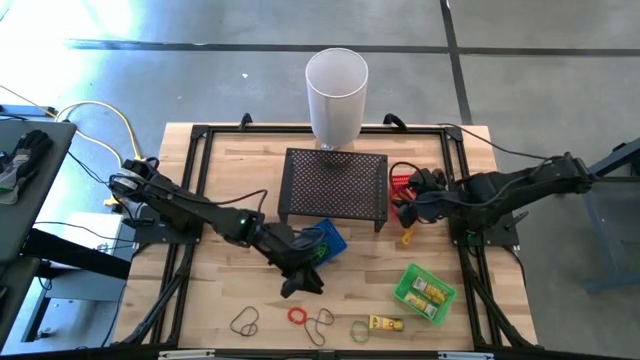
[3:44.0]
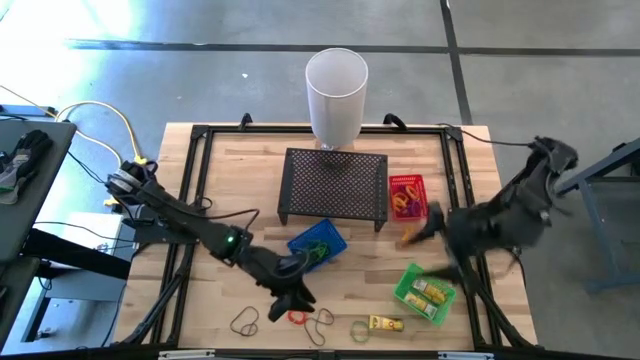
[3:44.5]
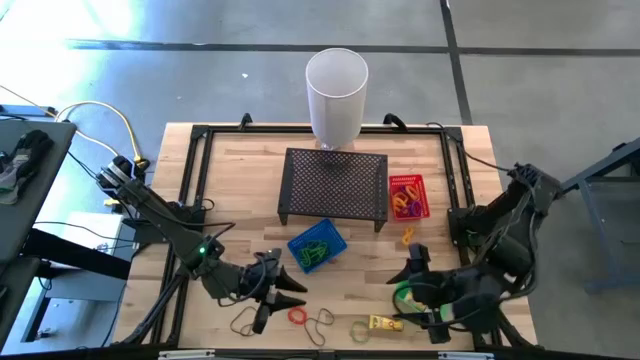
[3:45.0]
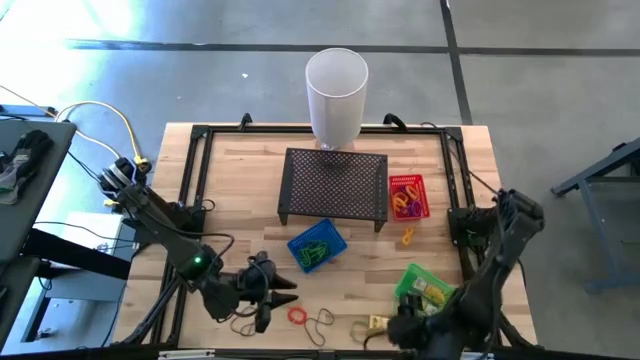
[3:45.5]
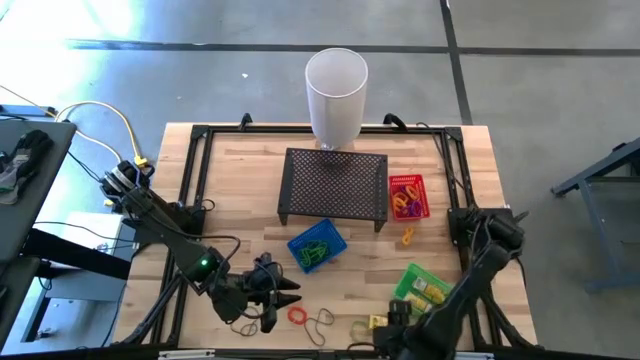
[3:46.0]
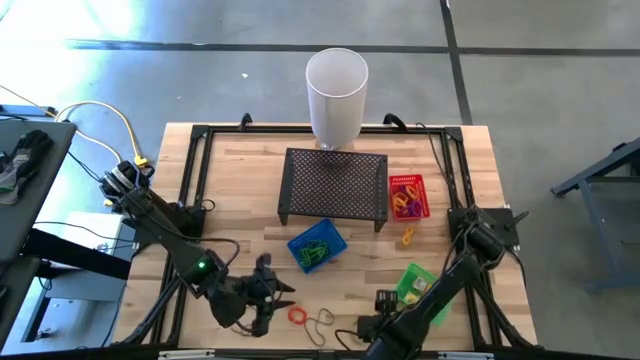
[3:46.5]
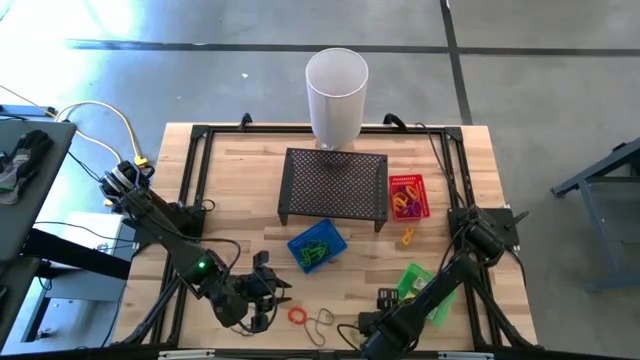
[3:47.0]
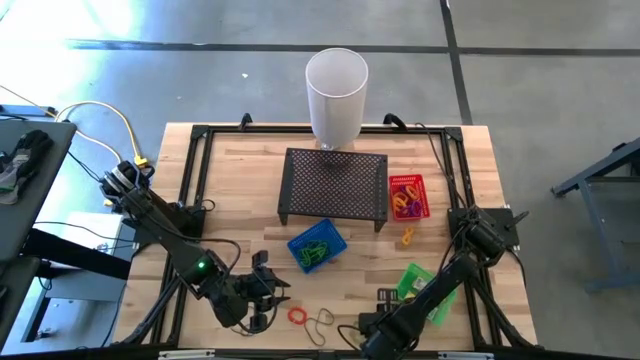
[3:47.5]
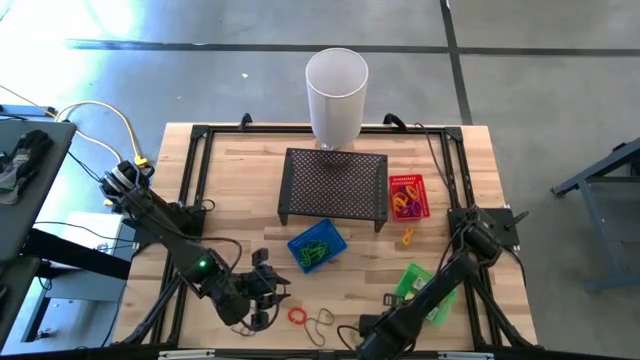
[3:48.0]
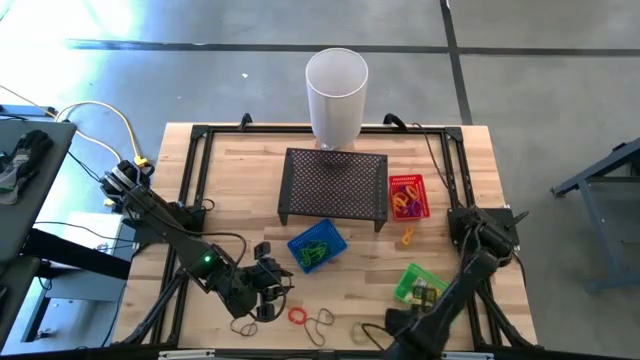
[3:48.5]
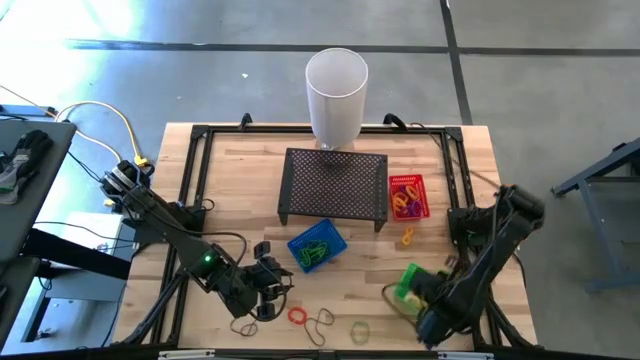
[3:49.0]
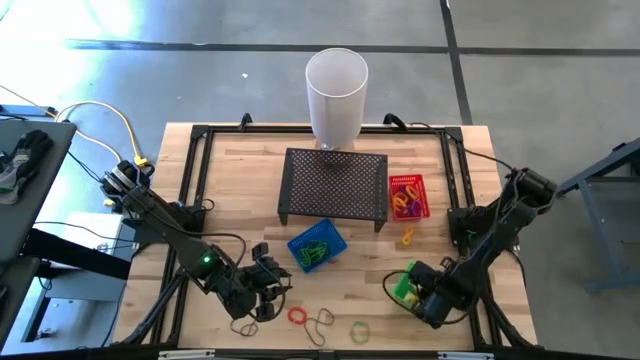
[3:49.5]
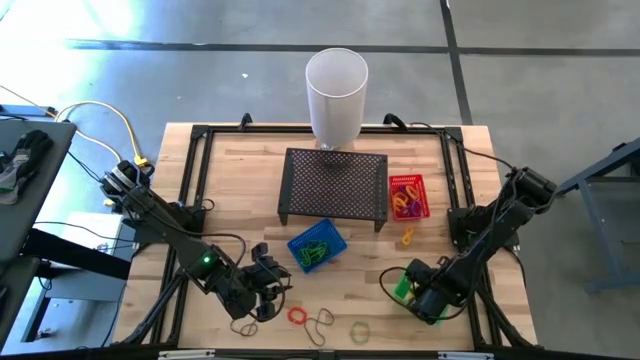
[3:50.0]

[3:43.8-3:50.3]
Task: Pick & Place Office Desk Supplies
Put the yellow crayon box into the green bin

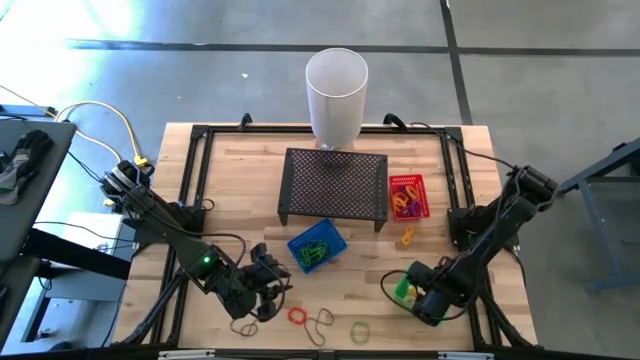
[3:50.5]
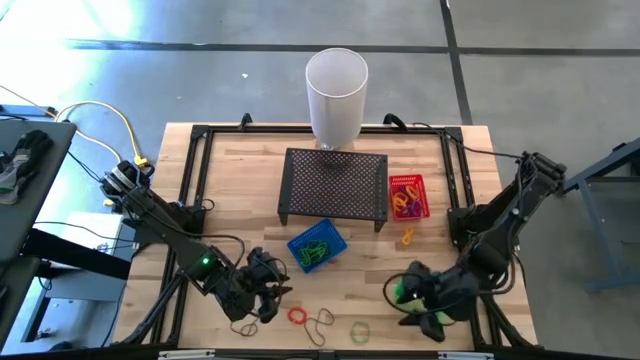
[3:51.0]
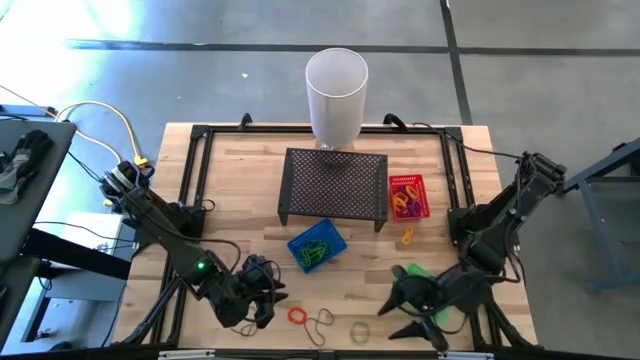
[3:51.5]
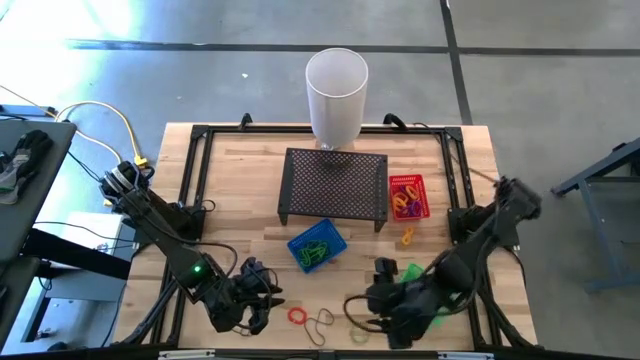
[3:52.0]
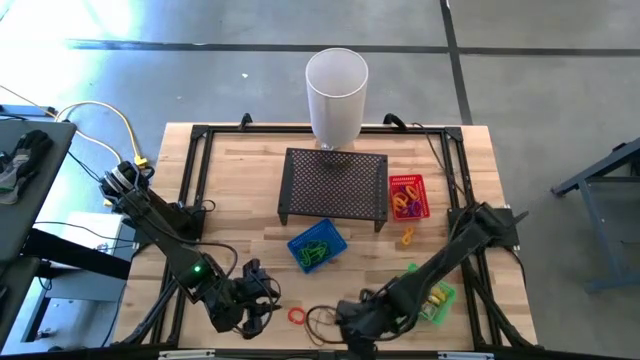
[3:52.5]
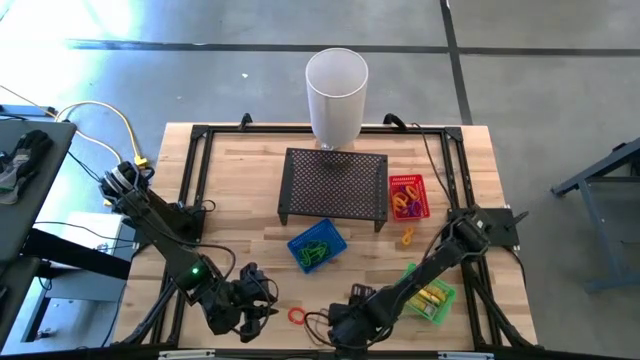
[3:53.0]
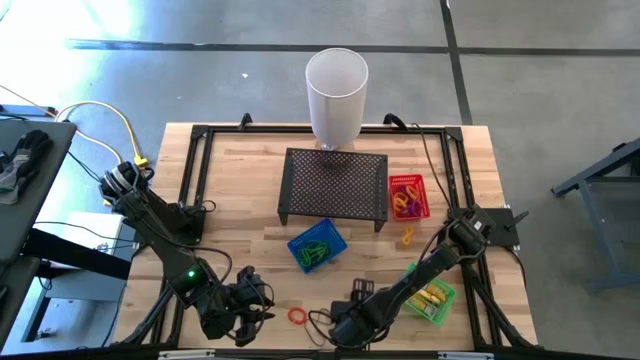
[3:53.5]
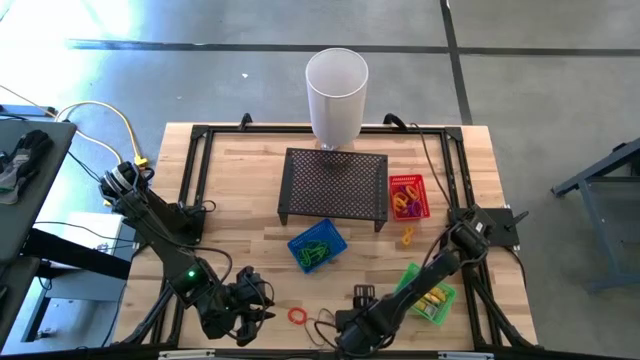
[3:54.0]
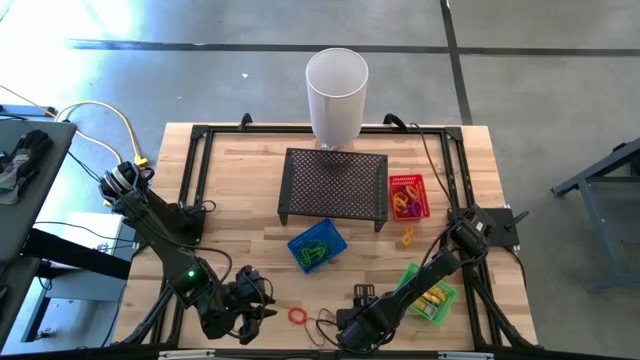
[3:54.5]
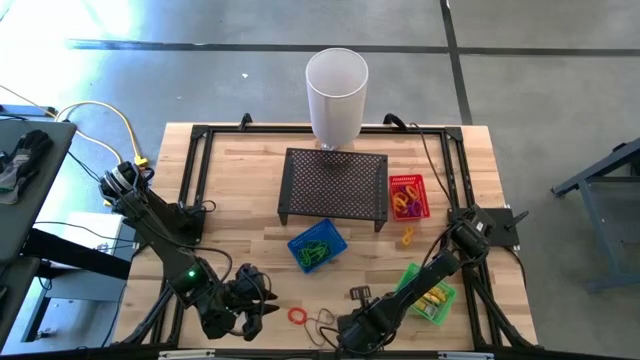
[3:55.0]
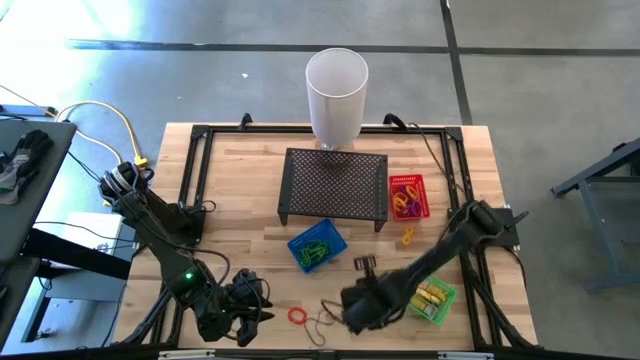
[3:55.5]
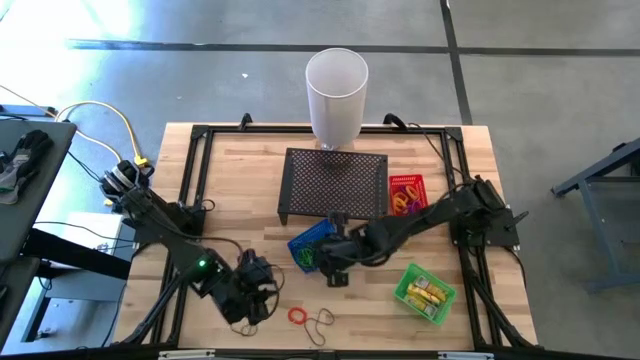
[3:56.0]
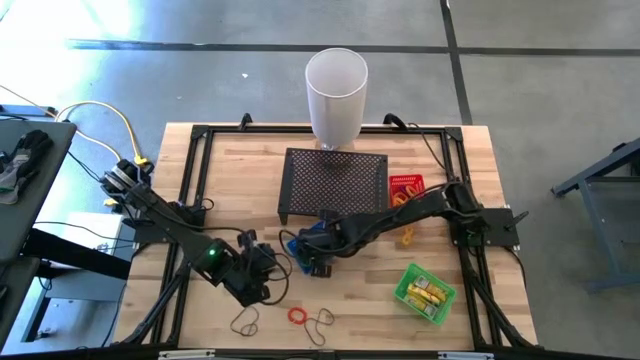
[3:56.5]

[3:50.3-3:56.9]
Put the green rubber band into the blue bin

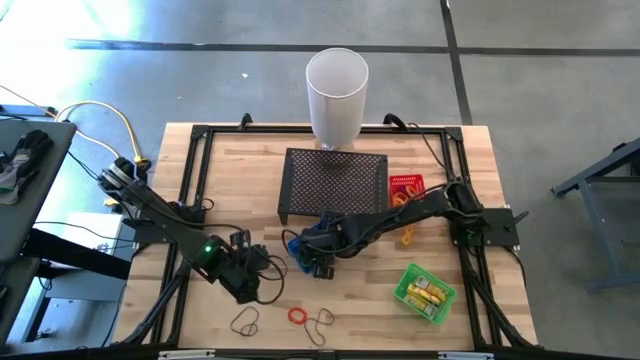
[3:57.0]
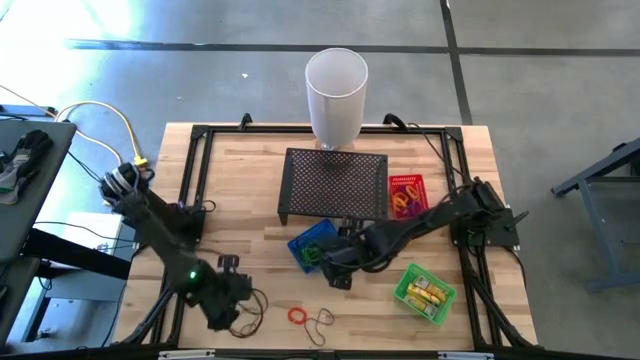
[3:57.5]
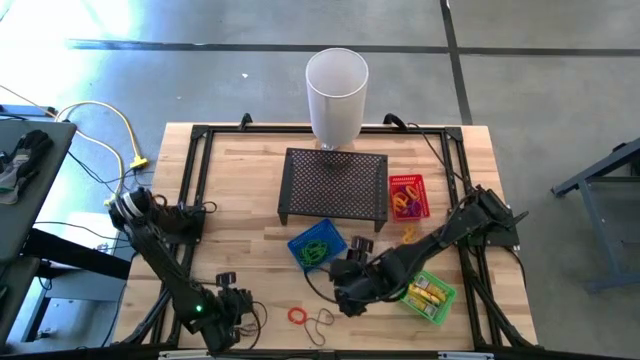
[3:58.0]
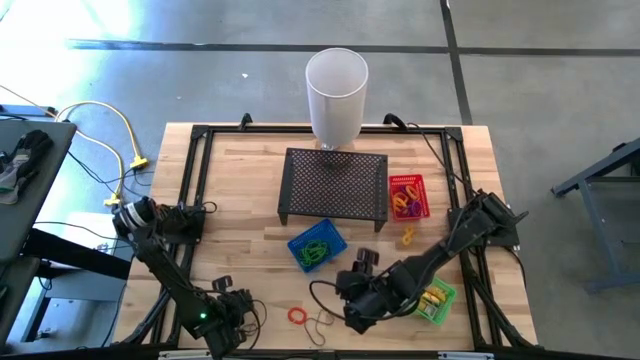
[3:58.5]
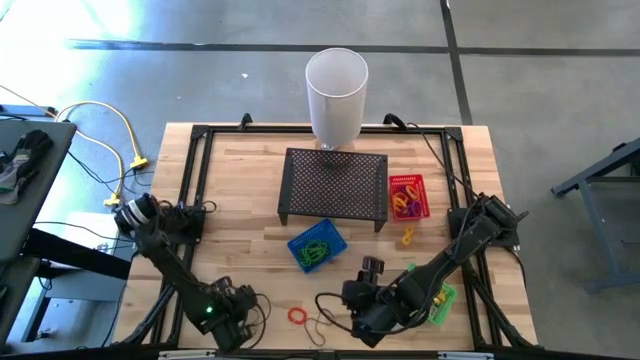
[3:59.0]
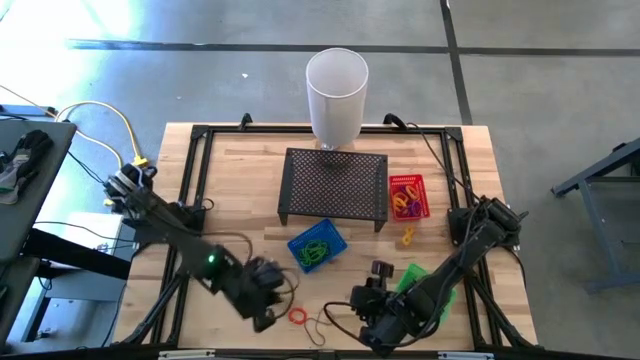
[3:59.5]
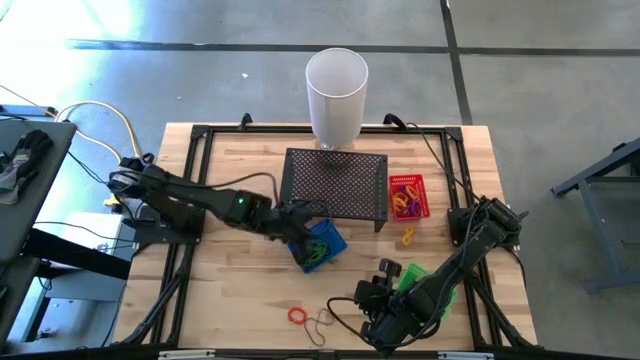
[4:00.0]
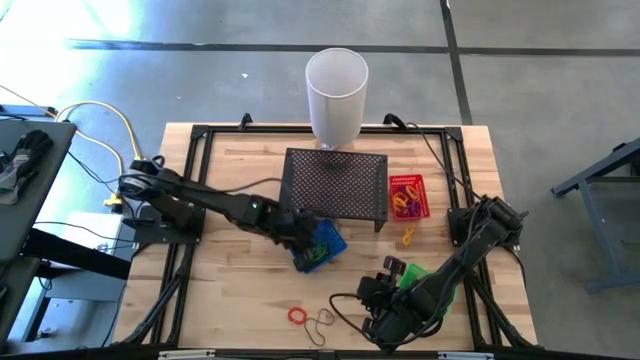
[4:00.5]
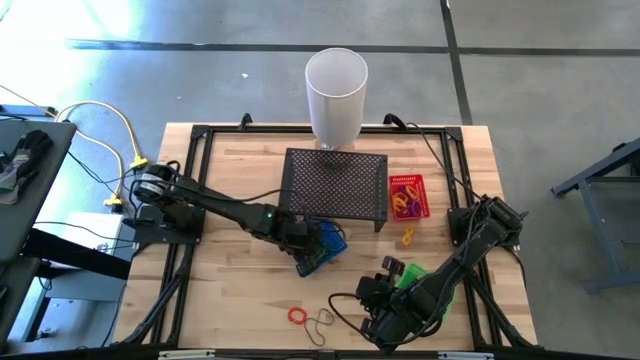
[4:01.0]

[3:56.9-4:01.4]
Put the violet rubber band into the blue bin

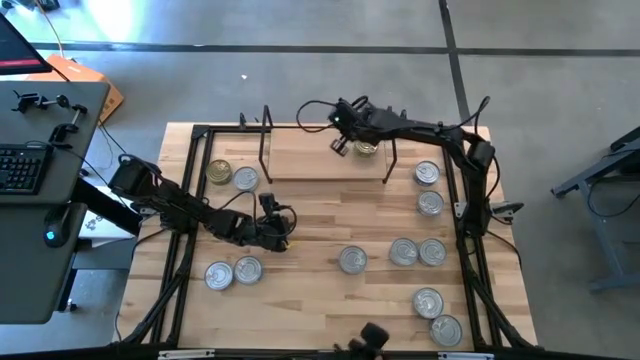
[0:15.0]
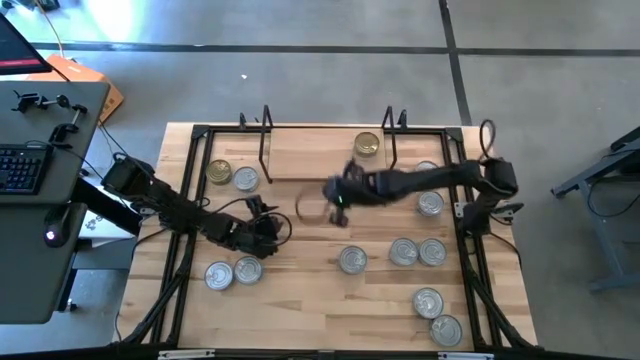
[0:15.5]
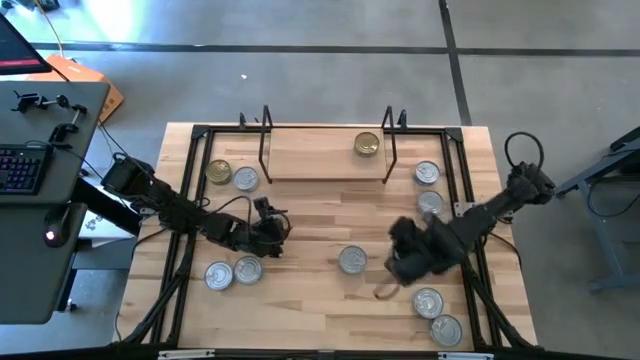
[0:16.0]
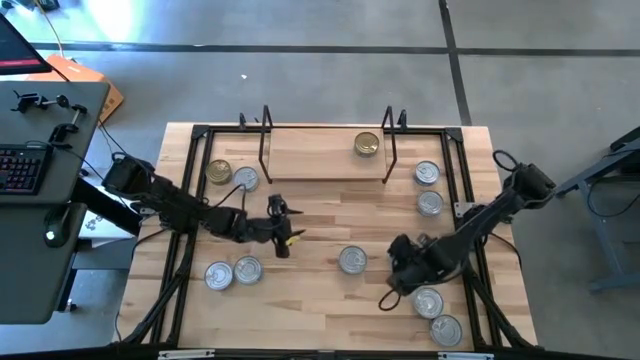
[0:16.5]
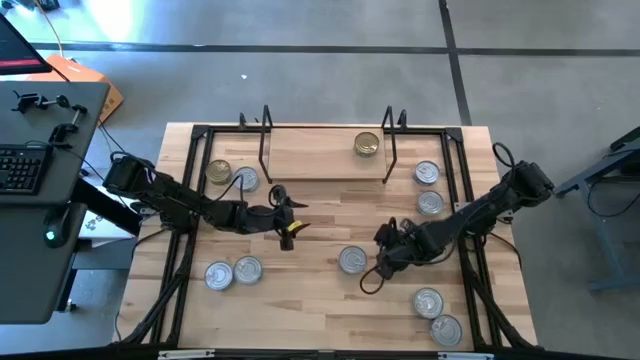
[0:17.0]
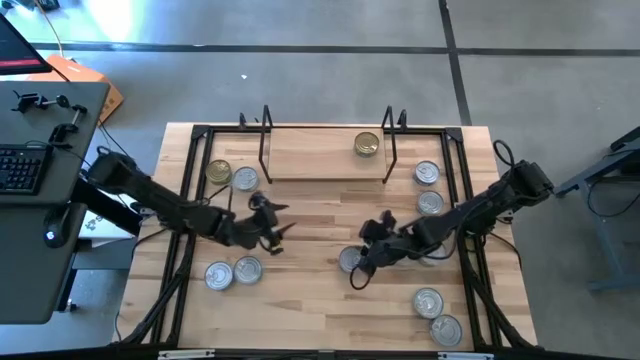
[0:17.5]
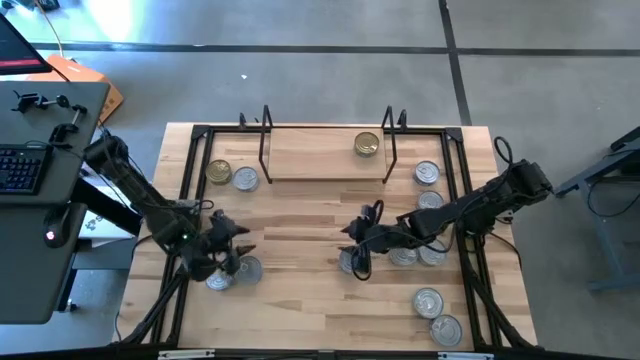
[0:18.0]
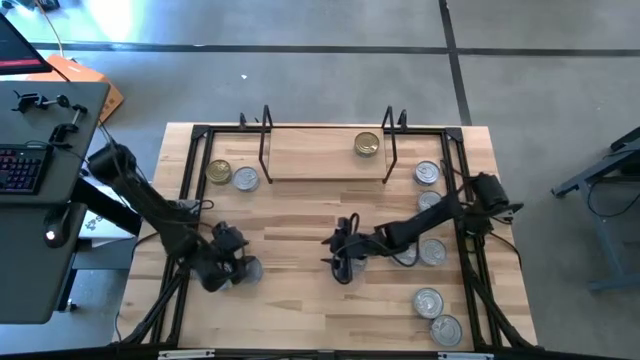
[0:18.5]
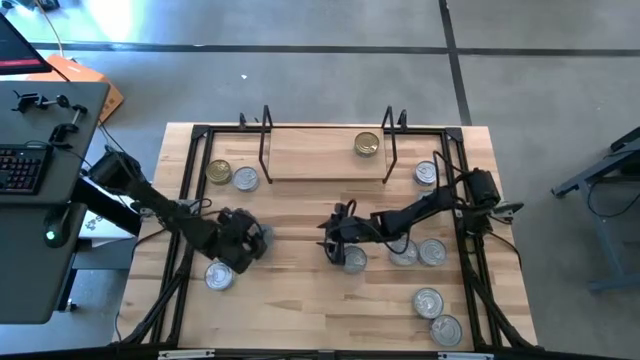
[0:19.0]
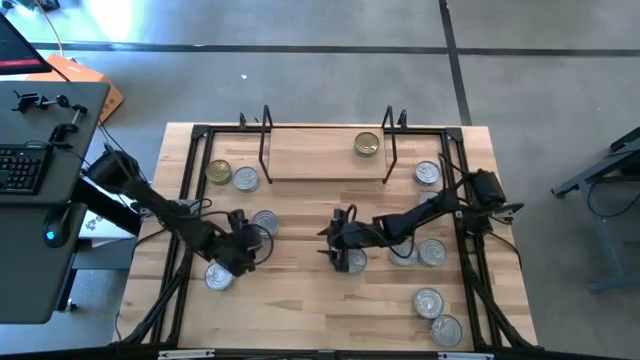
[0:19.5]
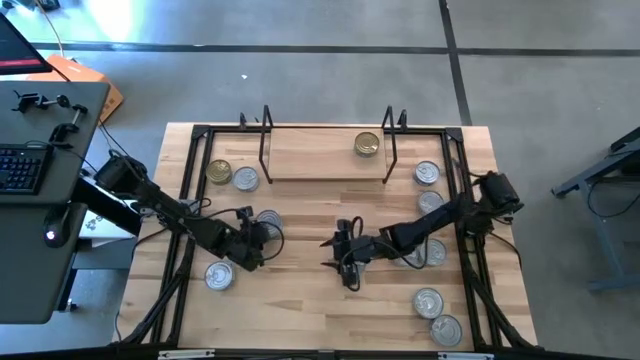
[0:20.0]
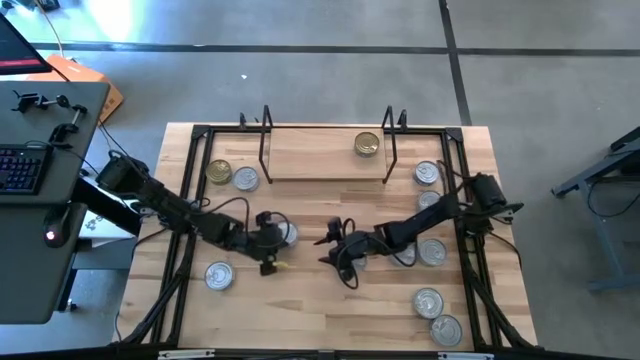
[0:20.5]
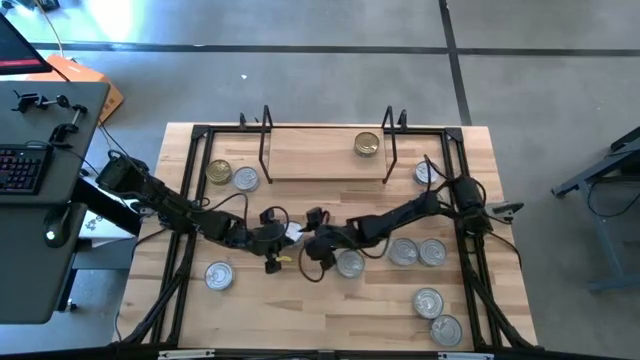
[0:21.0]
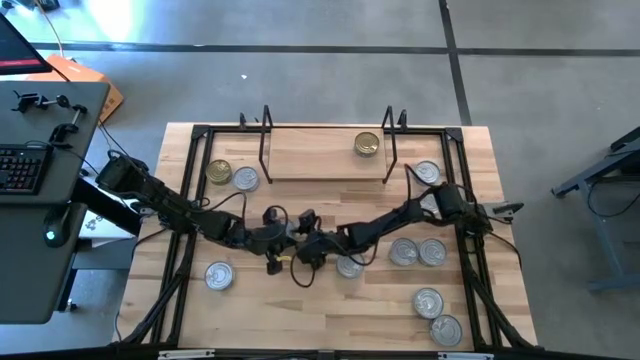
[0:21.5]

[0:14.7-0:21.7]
Task: Stack canned seafood by type on shelf
Put the light blue tuna can on the shelf
